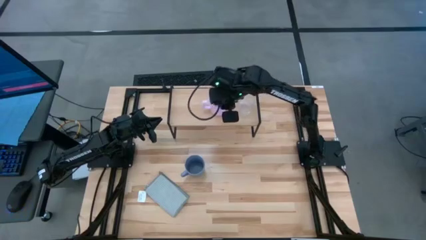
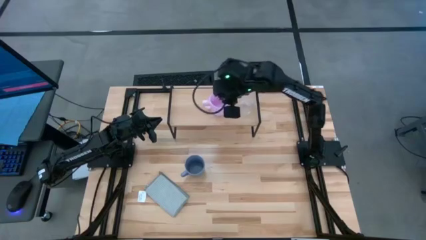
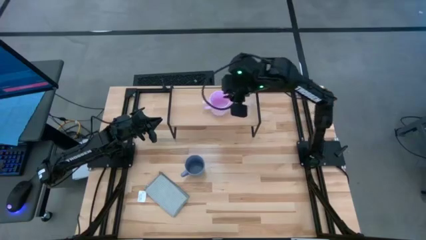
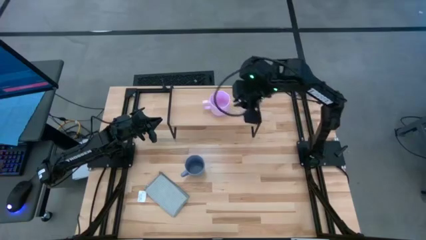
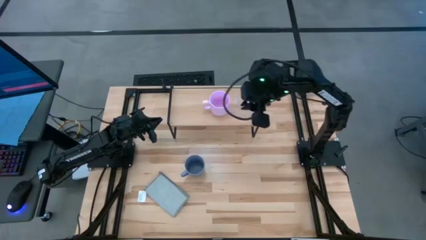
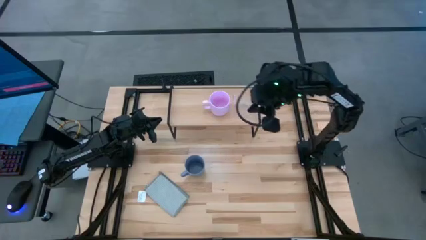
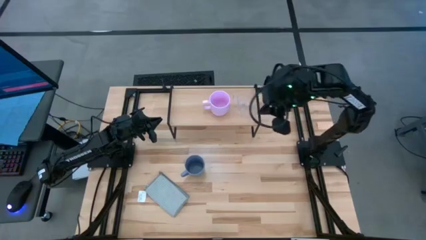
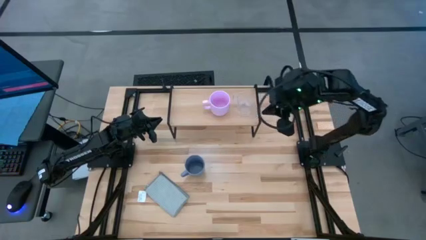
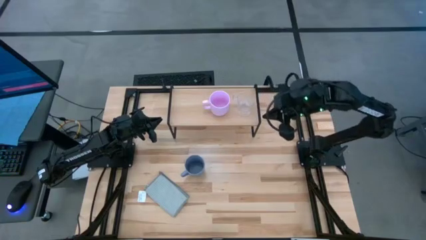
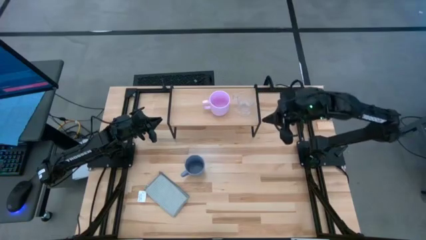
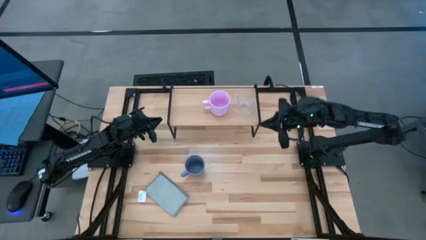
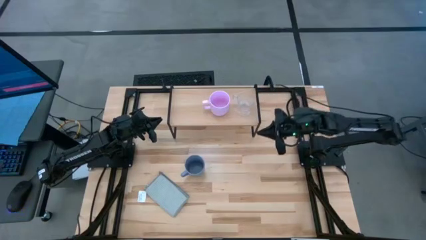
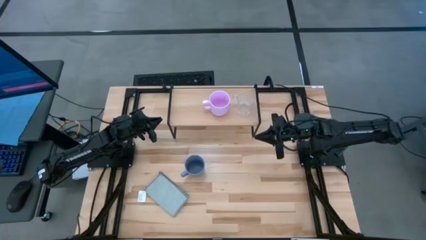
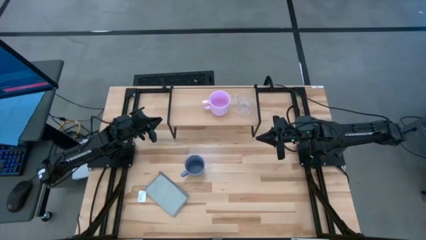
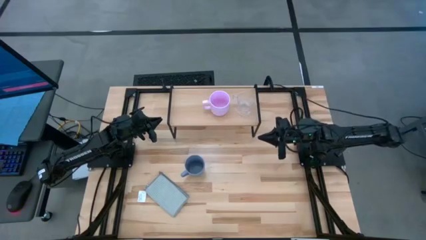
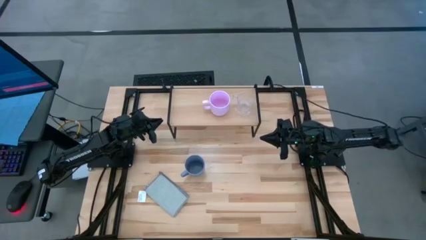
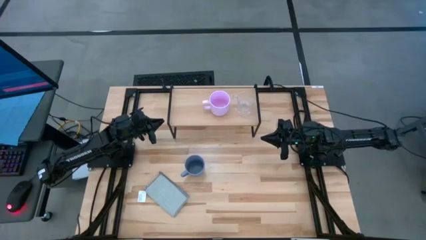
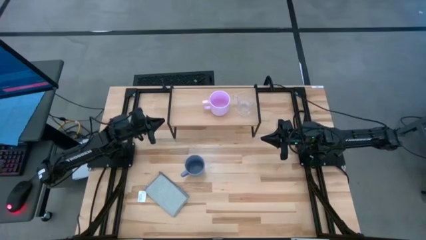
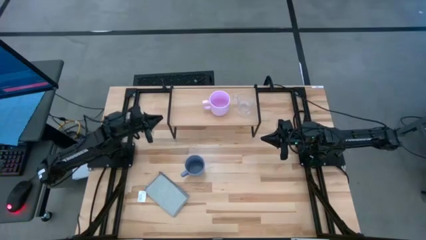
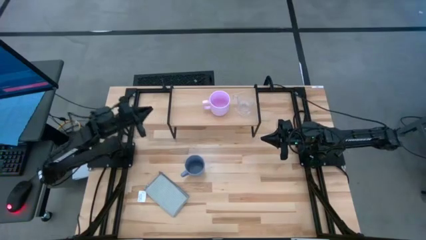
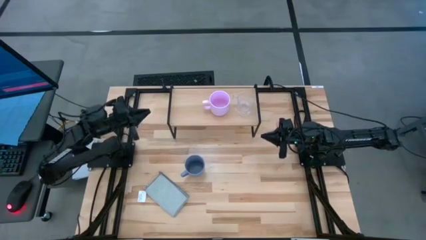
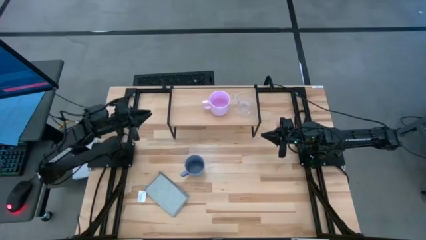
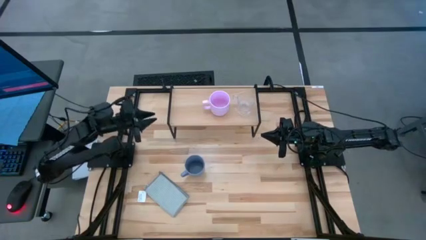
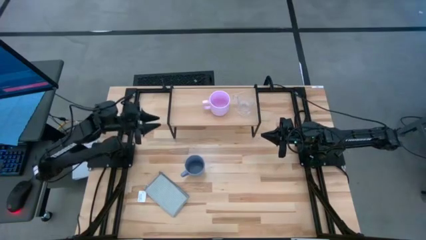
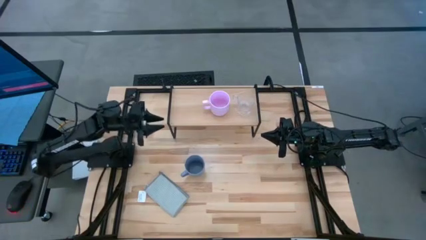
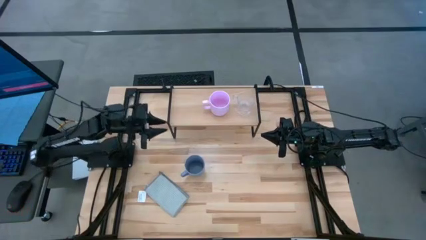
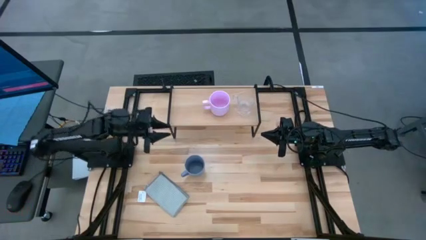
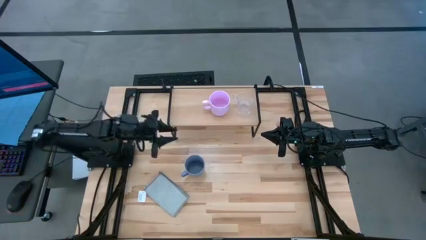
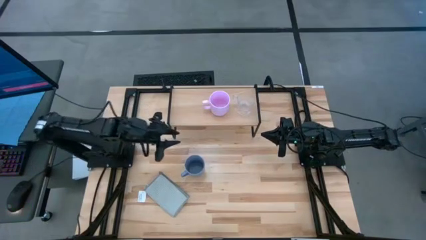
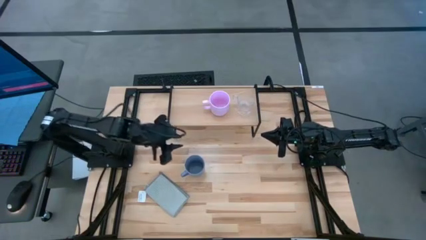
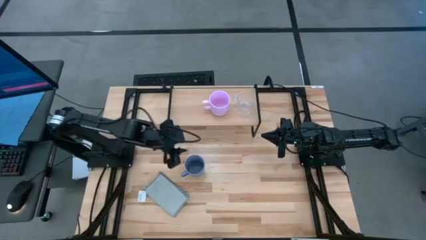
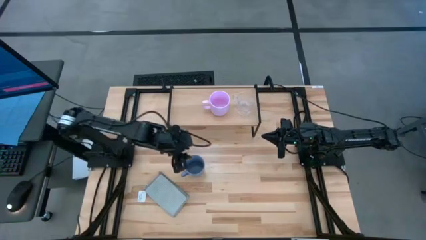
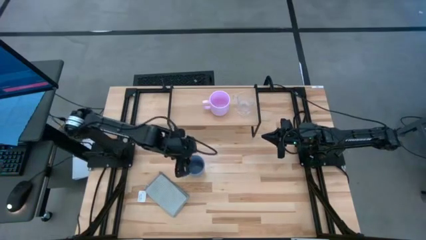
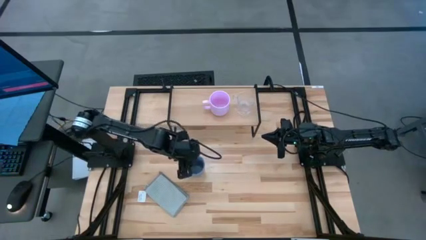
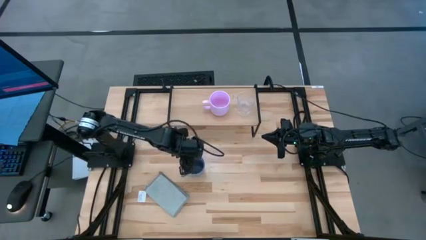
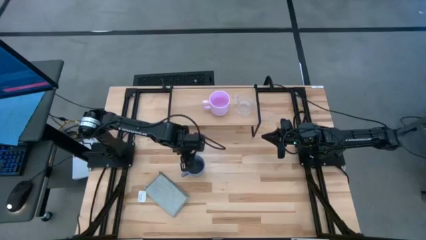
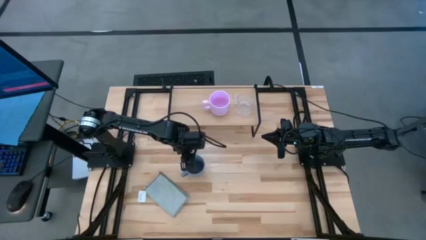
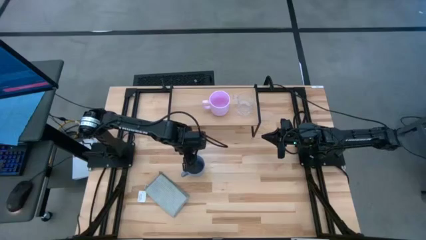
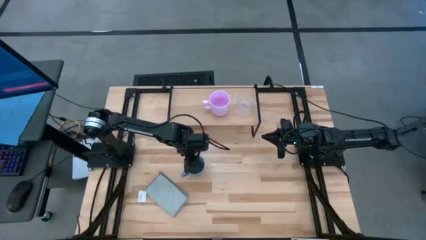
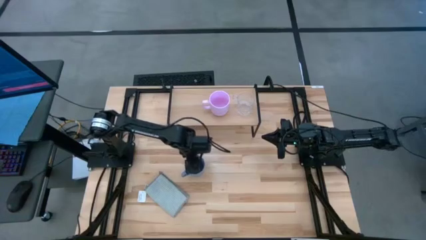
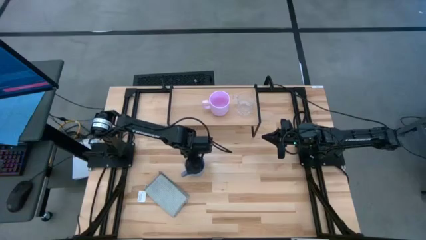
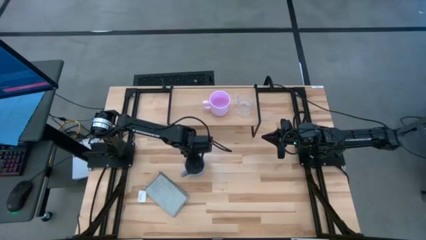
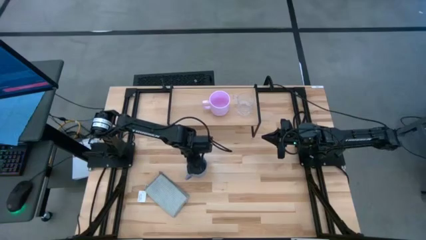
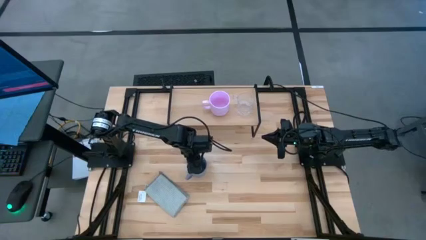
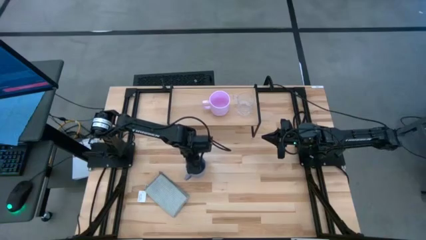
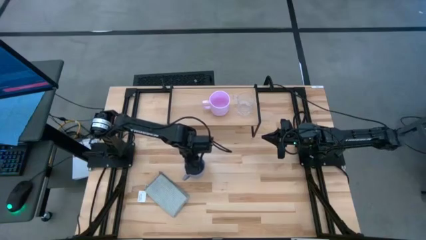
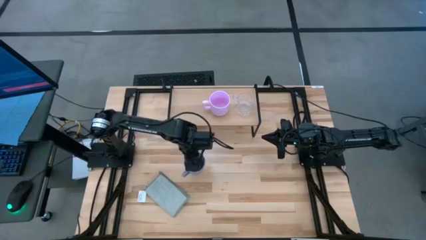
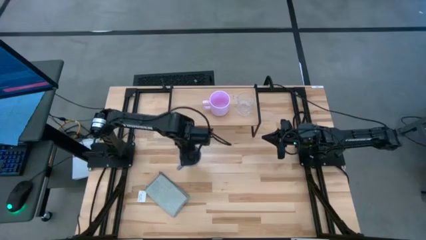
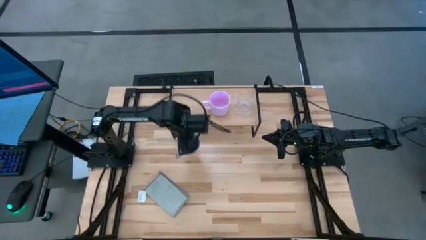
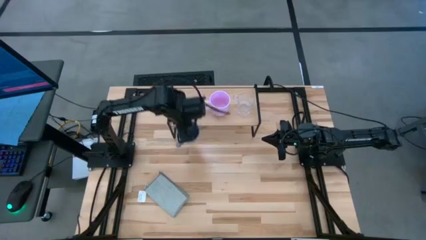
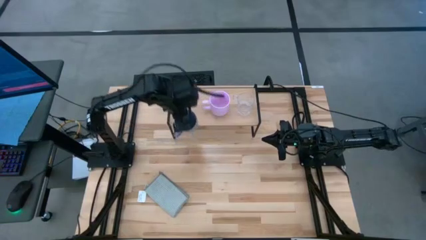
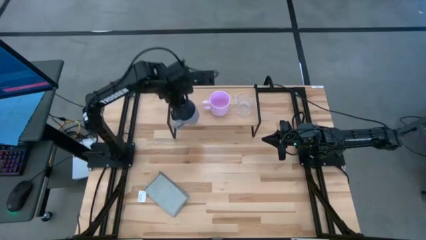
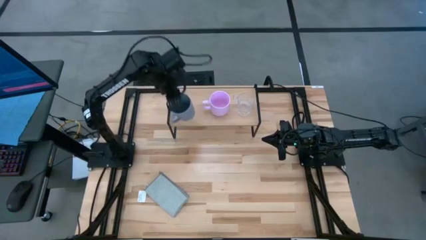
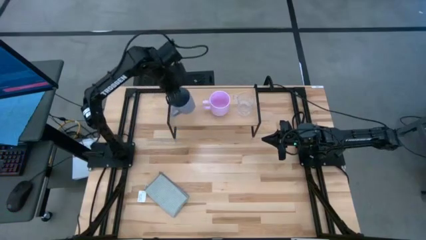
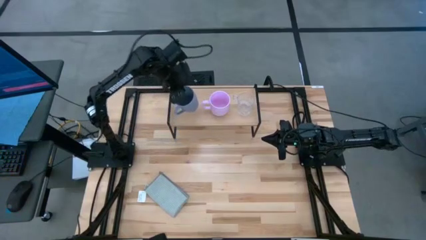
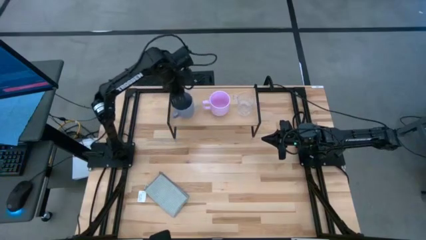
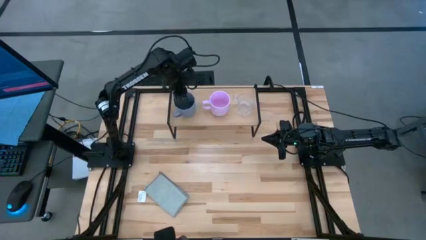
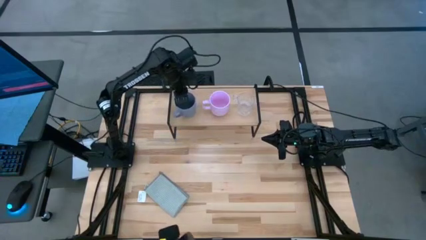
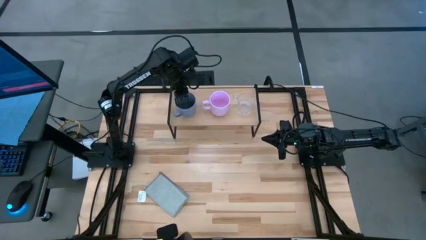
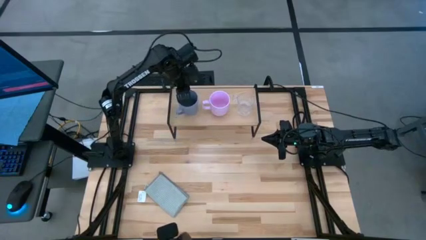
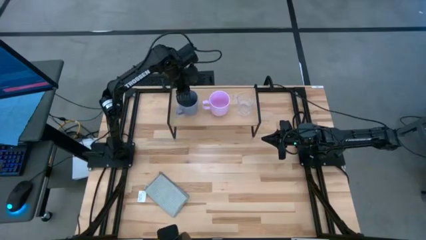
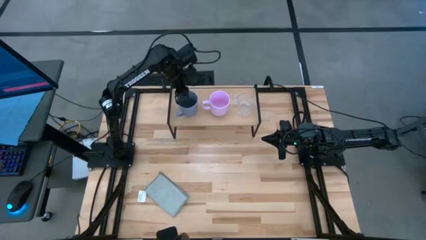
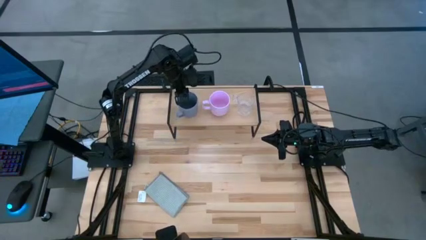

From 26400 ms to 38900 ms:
Task: Stack small to large cups/mugs on shelf
Put the light blue mug on the shelf

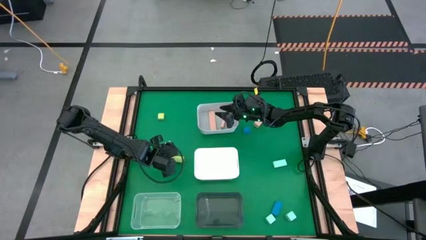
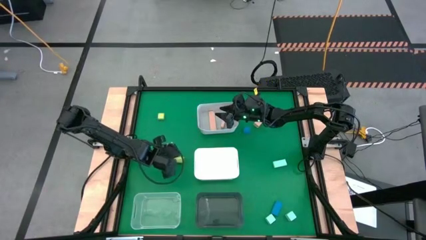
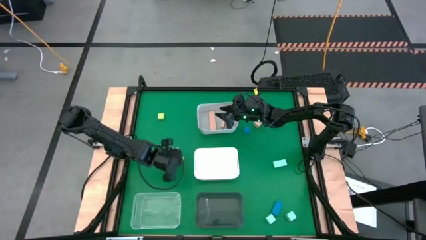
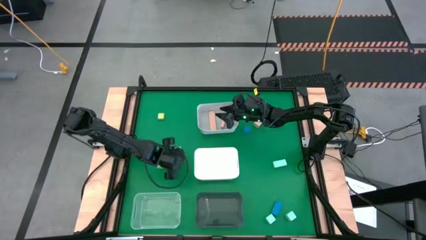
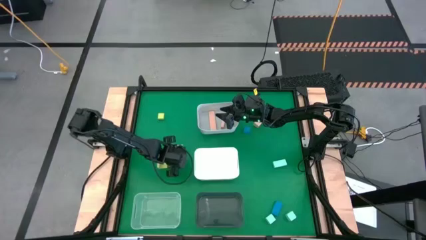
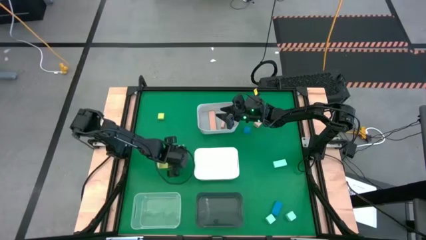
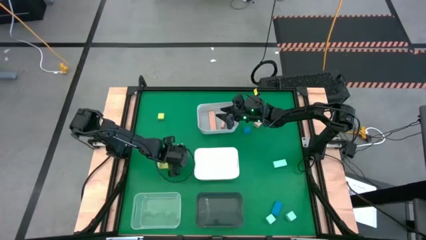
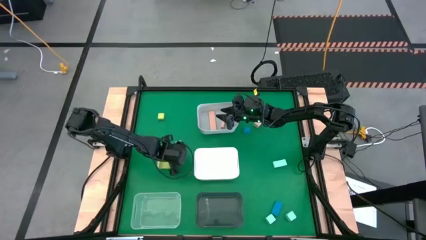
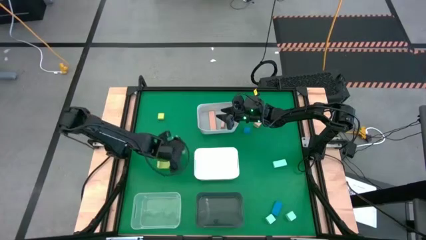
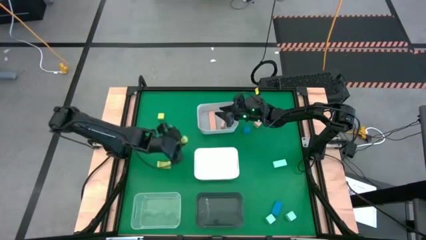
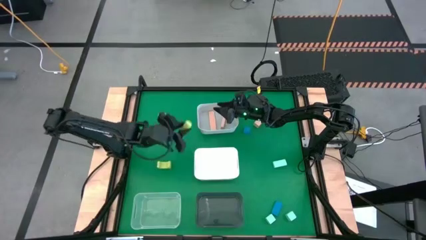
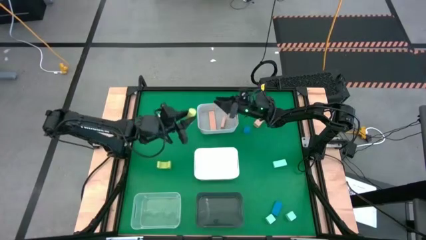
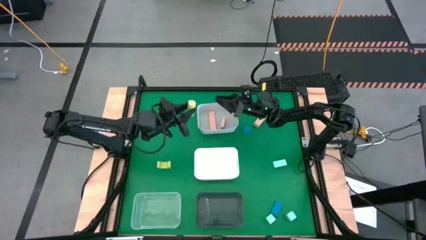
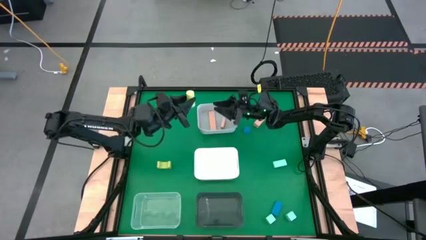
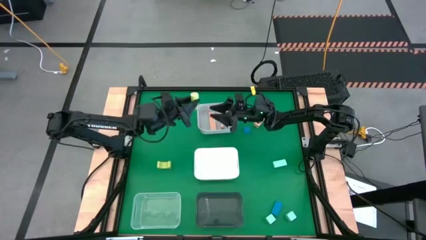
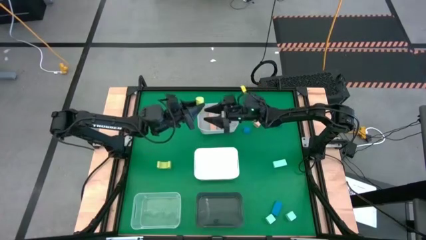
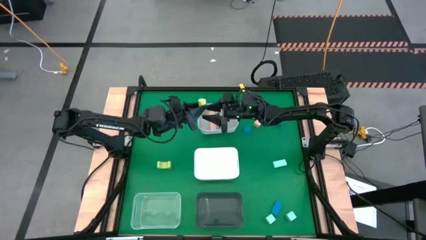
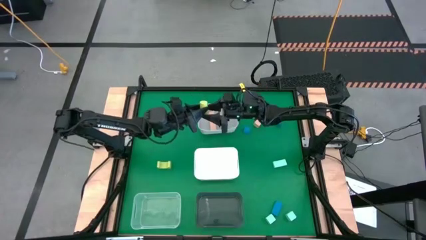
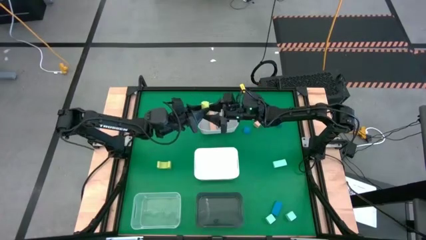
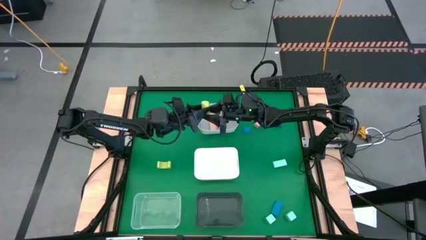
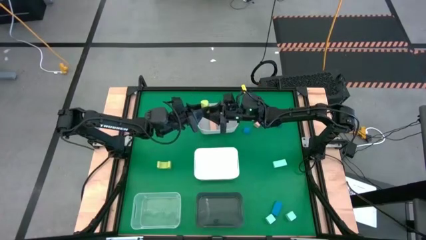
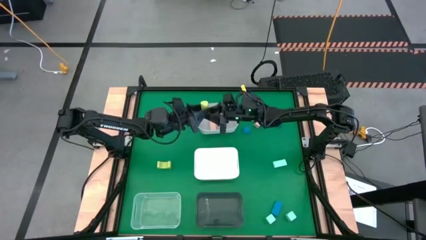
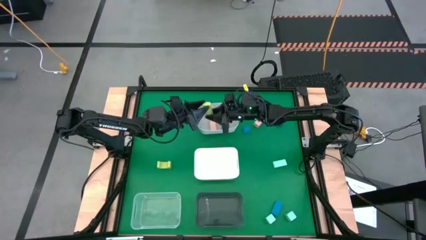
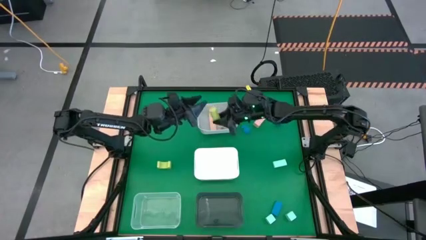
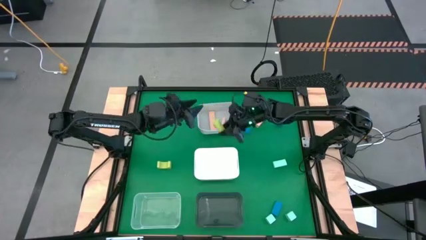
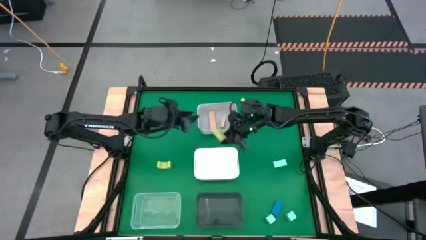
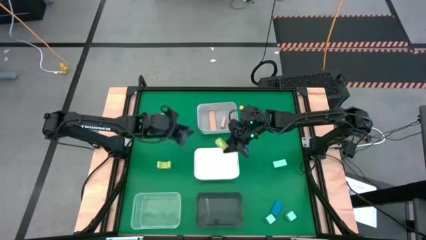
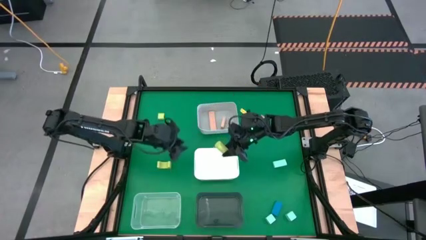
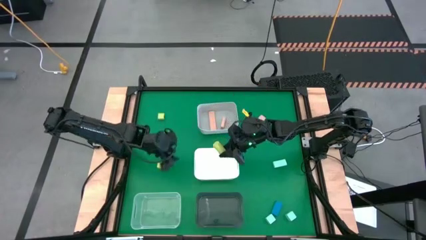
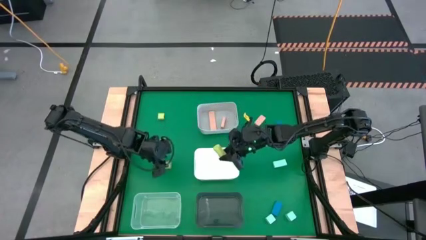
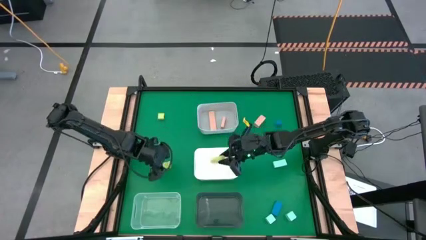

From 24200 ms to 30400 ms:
Task: Sort & place blocks by color
Put the bottom right green block into the white bin
